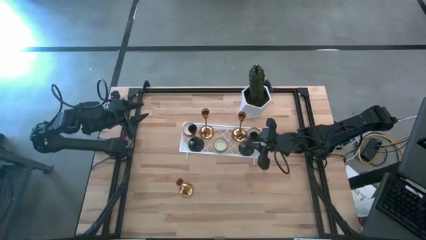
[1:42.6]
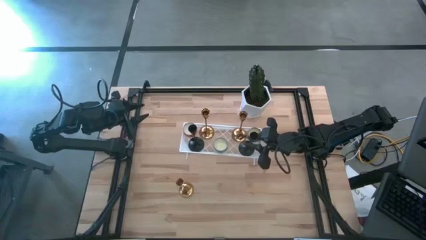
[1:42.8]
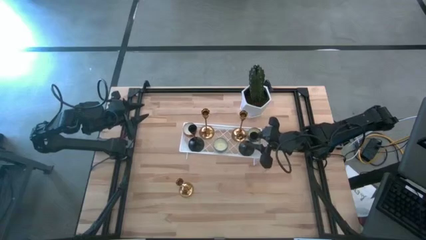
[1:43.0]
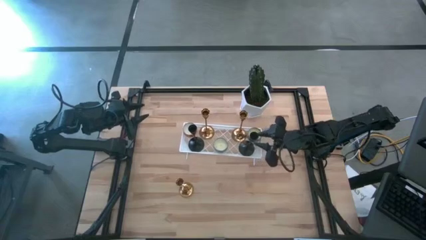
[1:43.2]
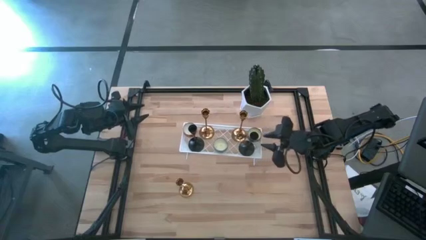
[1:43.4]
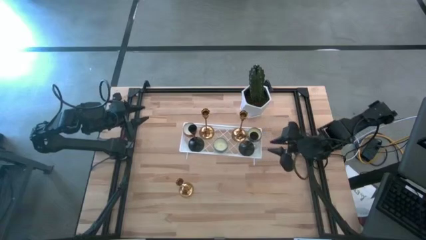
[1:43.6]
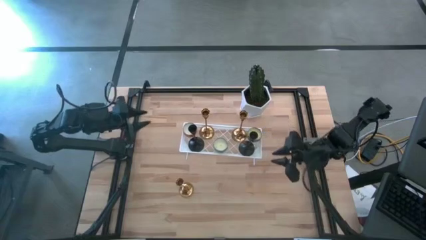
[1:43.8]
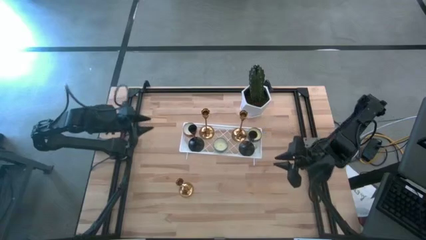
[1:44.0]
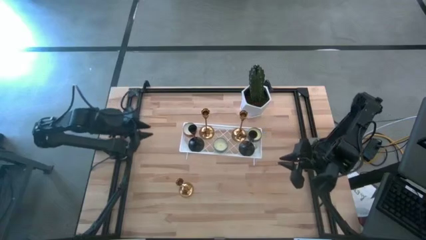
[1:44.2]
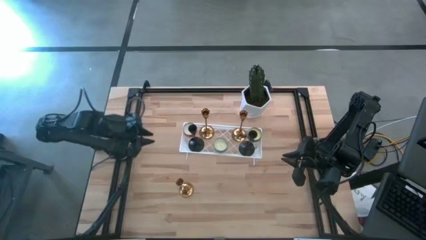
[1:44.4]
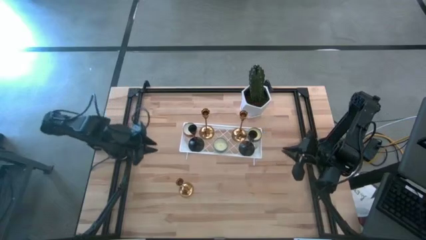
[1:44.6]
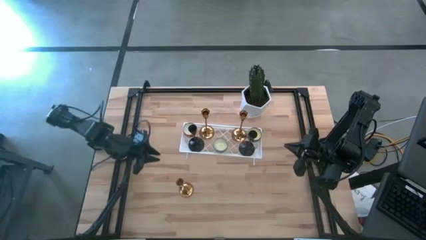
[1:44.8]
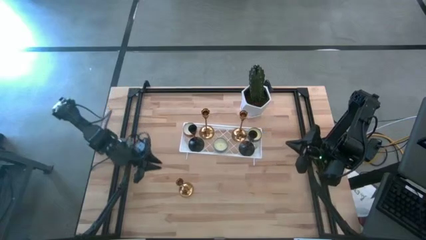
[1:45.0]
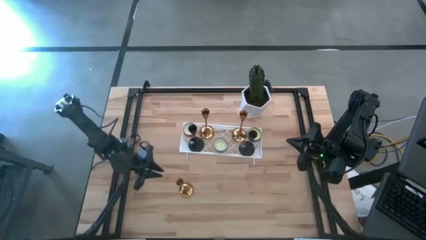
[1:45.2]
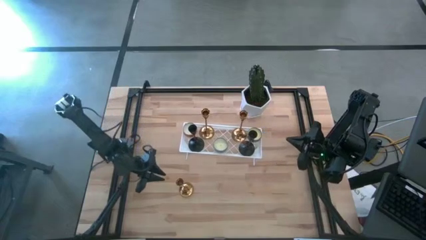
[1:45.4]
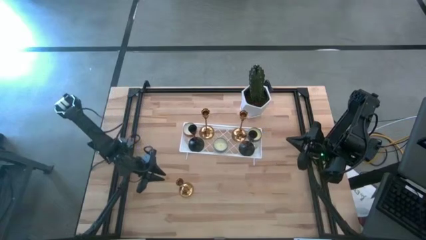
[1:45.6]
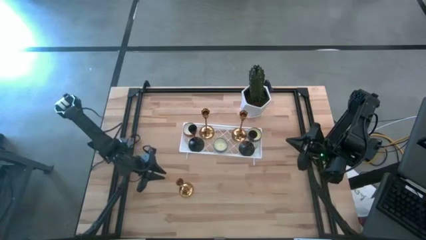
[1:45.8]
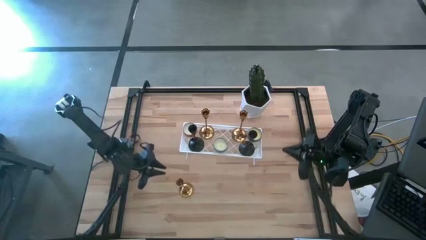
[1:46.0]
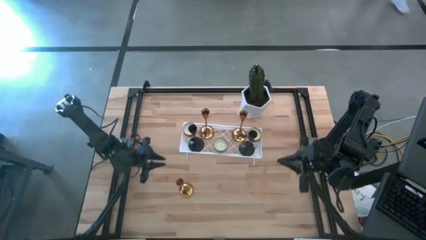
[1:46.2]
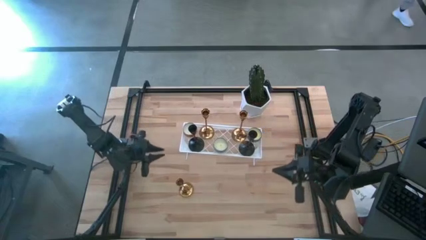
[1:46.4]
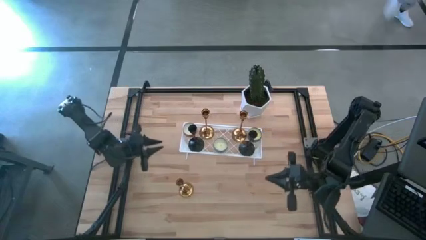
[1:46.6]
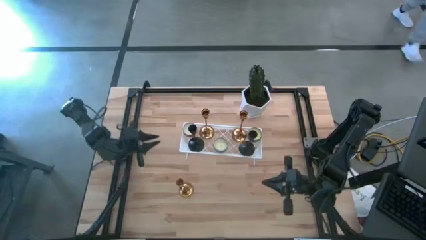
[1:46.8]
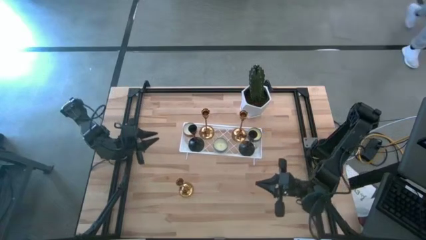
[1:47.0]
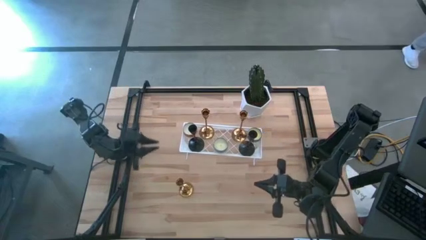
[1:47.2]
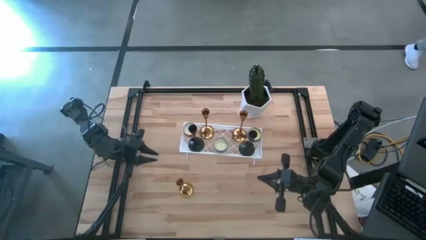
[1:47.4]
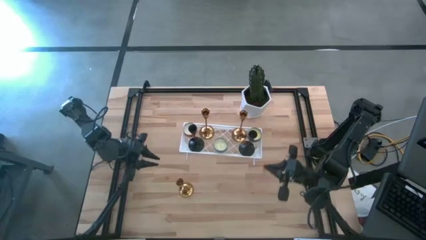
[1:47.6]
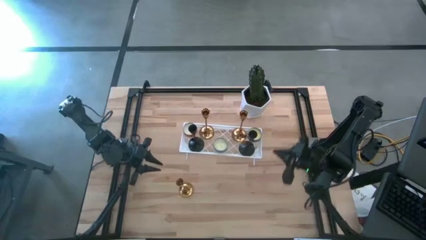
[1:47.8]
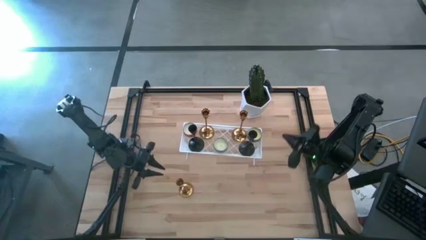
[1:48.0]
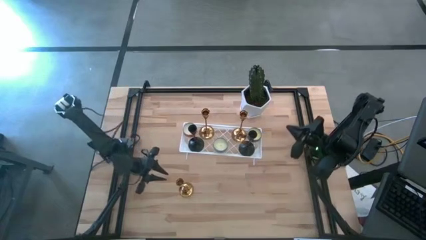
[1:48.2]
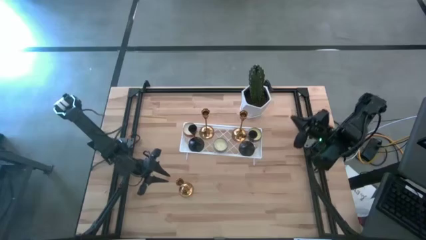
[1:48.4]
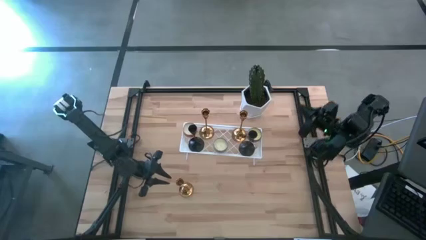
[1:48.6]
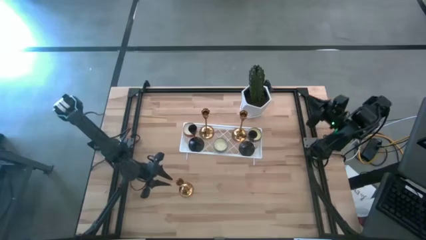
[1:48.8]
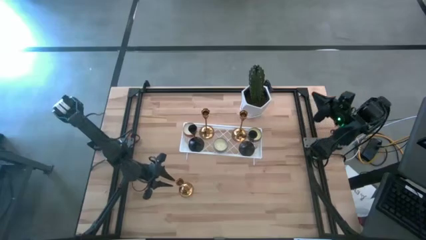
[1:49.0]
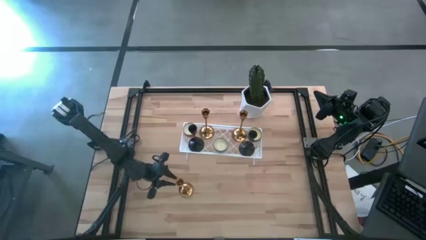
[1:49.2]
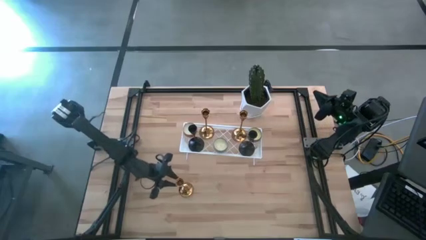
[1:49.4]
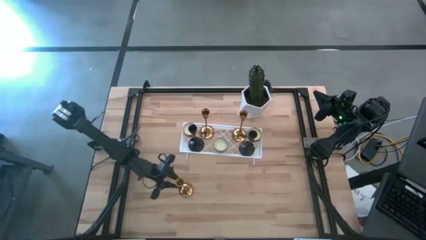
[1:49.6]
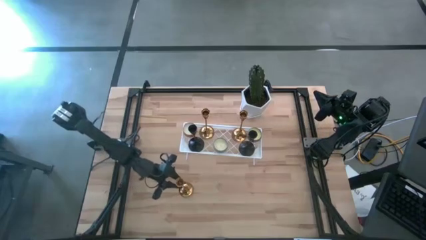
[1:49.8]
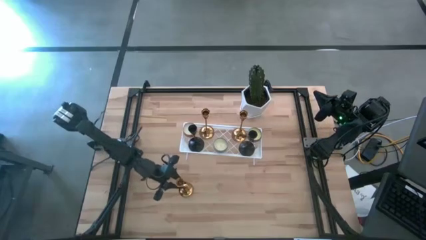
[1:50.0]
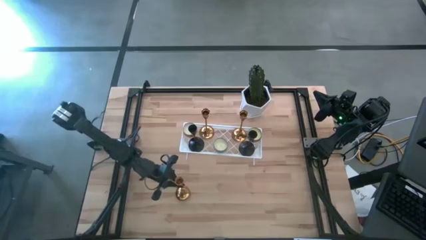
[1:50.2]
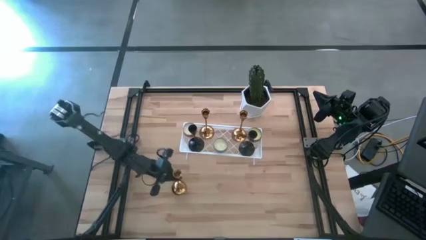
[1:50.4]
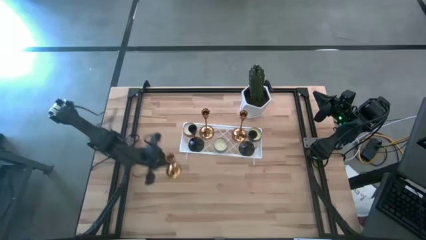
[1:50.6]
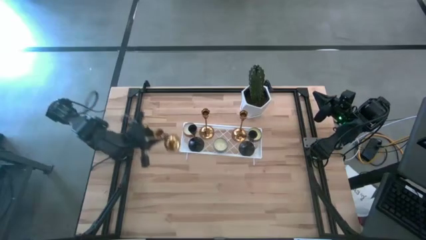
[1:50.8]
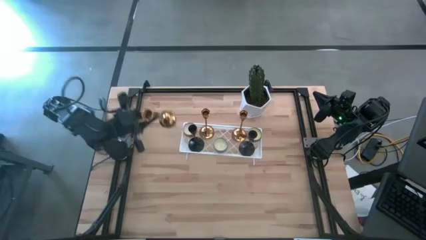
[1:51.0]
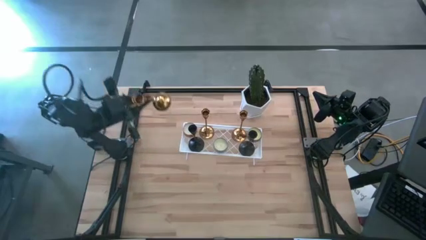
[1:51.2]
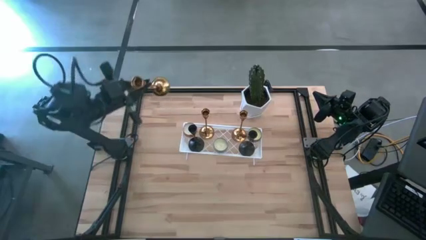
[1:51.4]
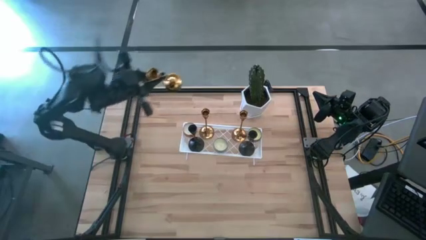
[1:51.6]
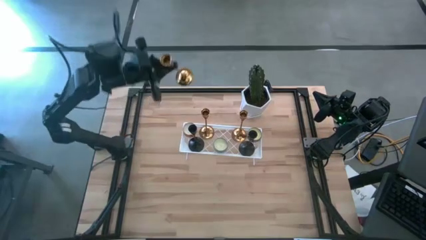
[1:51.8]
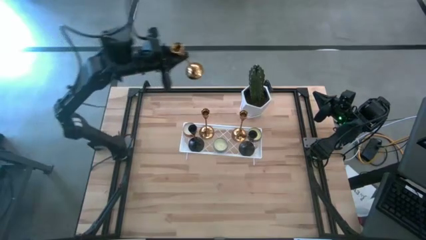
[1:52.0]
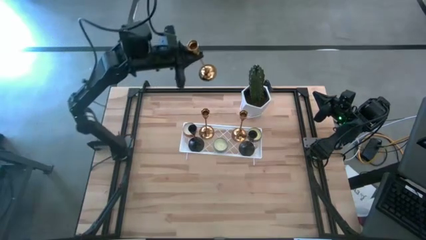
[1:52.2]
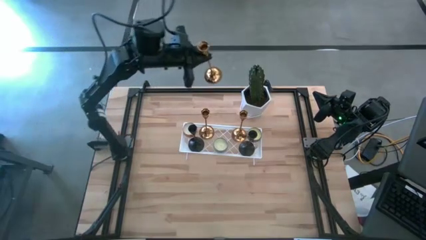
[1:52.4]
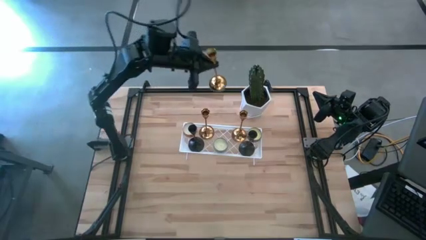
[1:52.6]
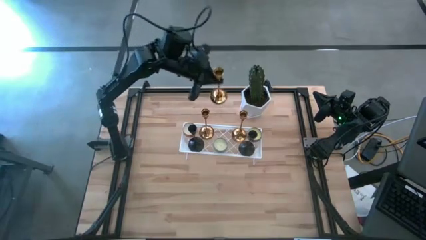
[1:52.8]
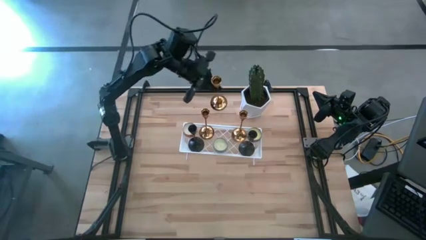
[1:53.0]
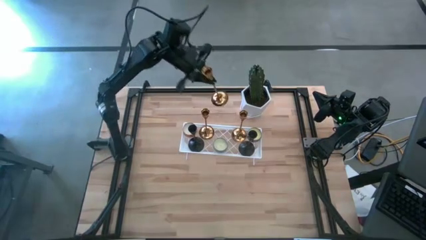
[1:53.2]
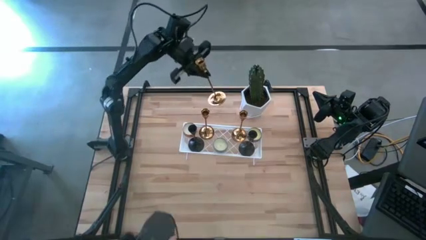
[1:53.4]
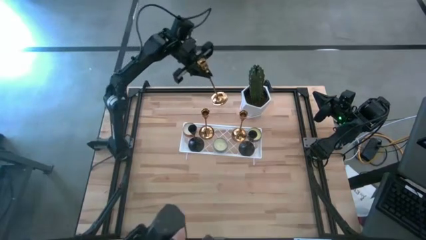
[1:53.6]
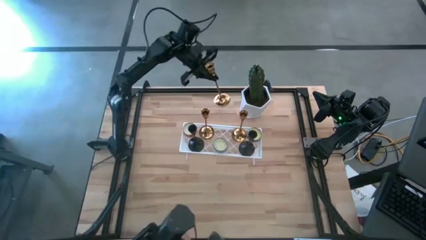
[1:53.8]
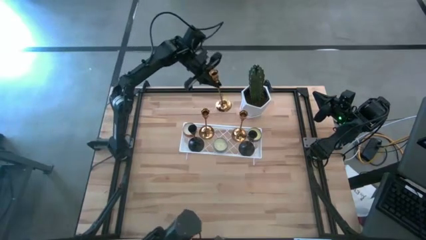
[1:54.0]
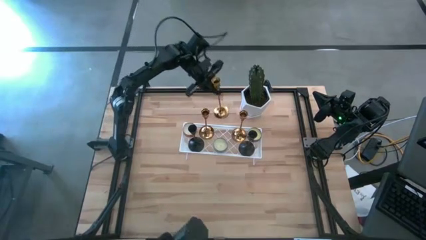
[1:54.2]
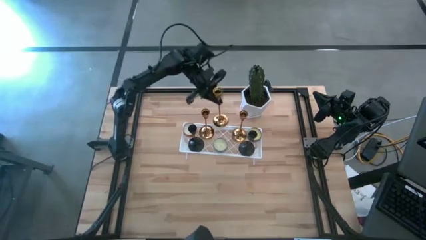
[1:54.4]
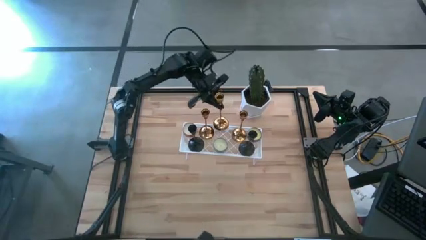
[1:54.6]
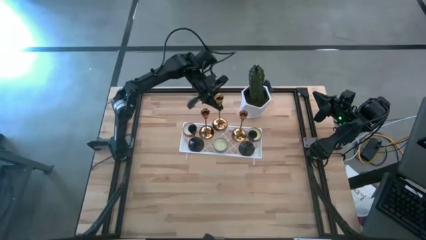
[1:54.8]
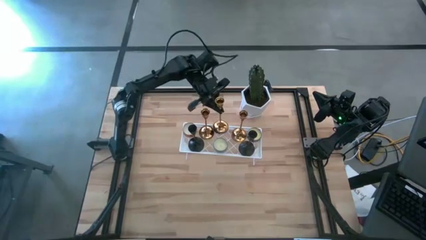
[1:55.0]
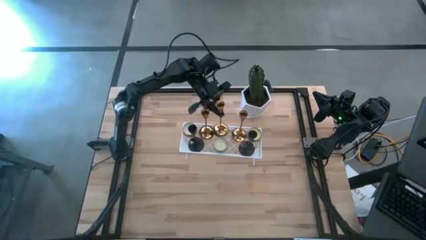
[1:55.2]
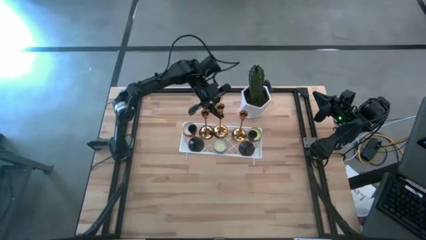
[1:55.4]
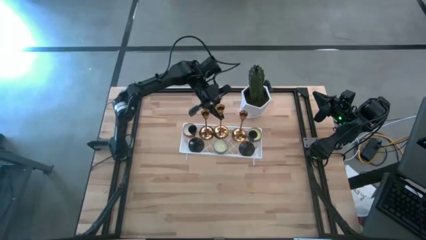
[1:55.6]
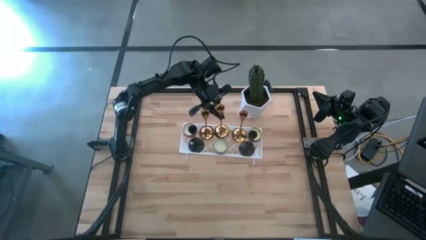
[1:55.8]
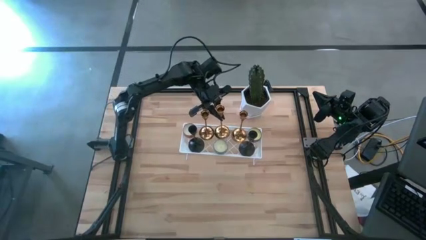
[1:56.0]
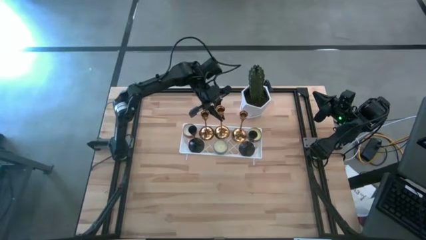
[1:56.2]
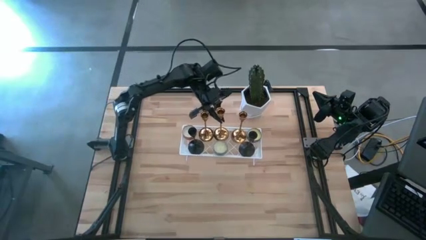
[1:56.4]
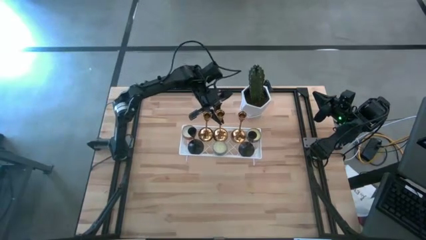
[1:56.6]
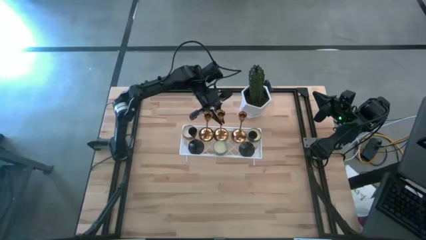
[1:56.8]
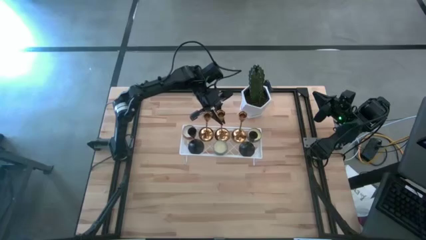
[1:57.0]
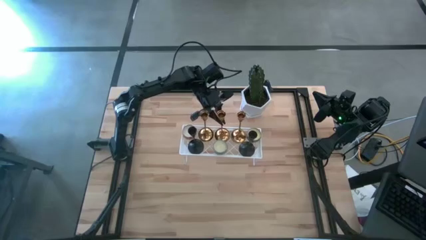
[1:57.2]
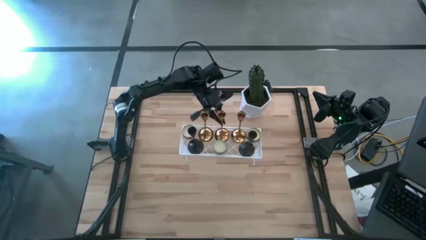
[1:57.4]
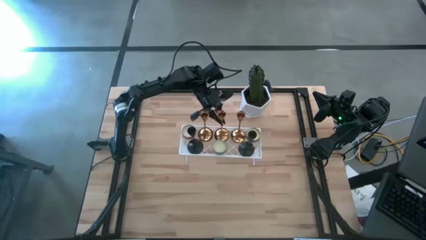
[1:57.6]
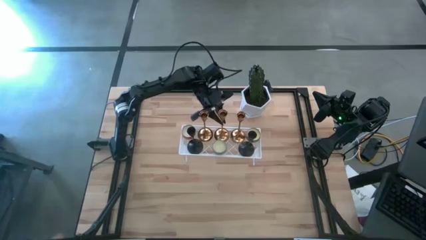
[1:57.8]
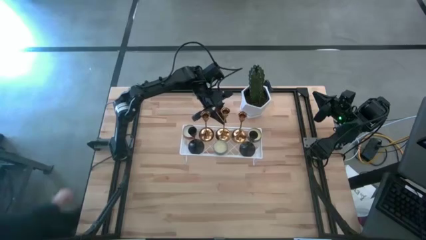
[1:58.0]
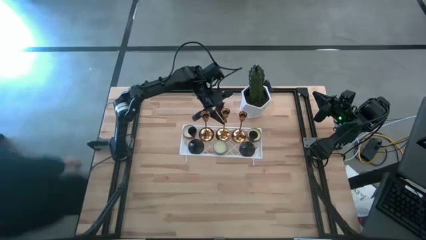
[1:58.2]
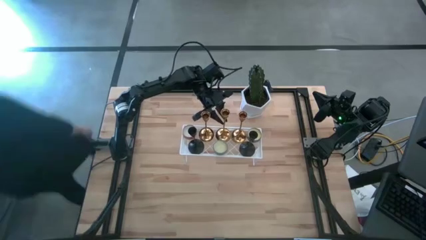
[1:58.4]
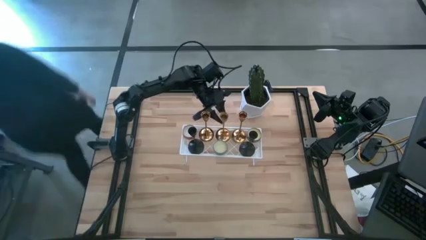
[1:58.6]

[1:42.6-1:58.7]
Task: Pick & Place candle stick holders
Put the gold candle holder on the shelf
